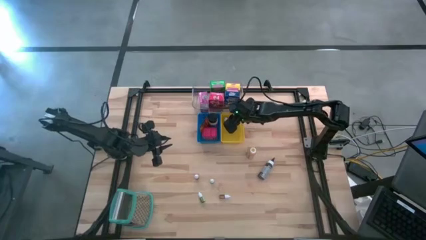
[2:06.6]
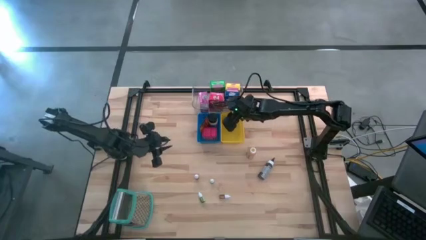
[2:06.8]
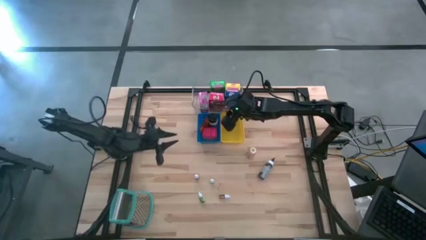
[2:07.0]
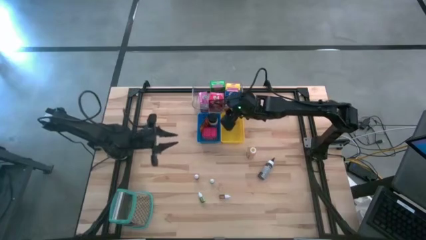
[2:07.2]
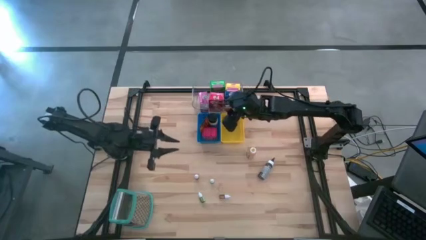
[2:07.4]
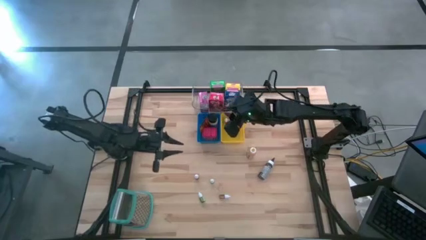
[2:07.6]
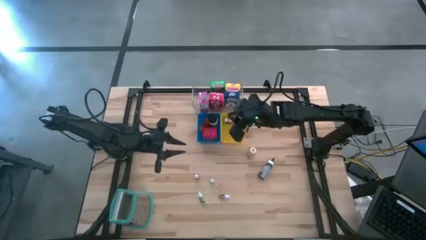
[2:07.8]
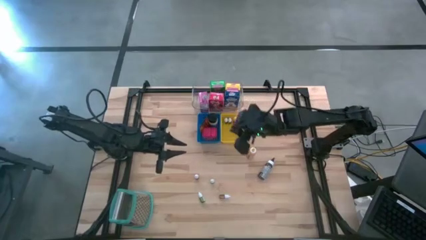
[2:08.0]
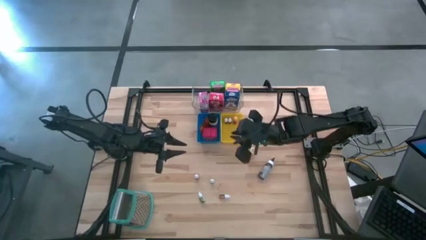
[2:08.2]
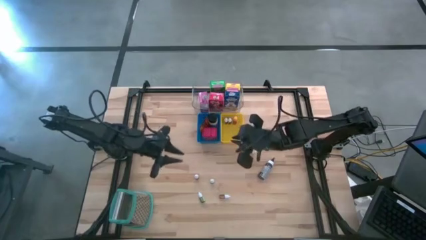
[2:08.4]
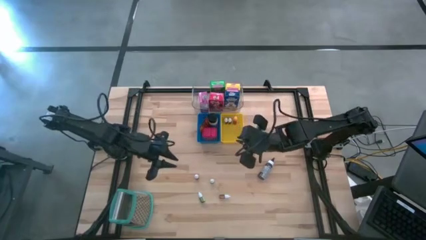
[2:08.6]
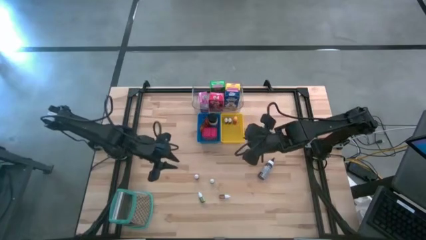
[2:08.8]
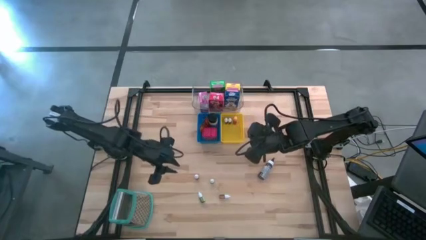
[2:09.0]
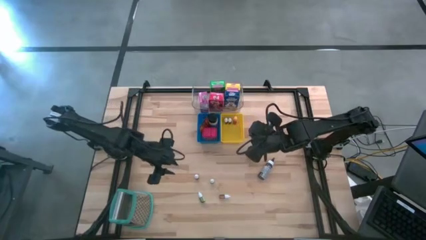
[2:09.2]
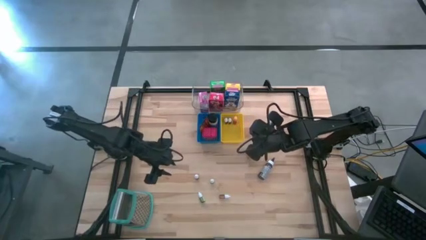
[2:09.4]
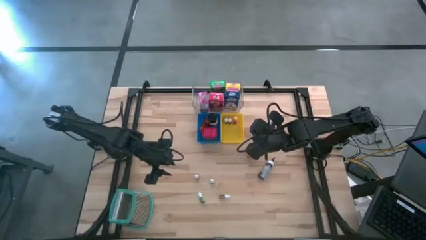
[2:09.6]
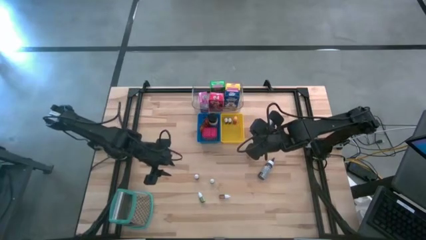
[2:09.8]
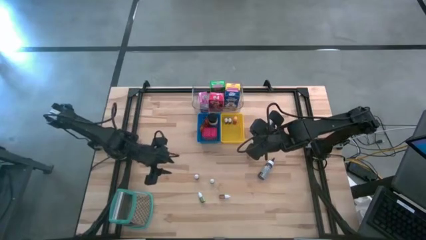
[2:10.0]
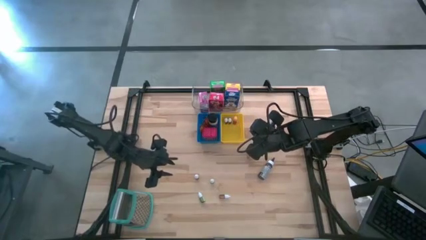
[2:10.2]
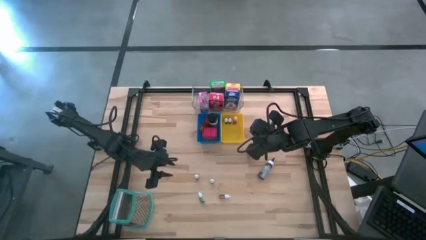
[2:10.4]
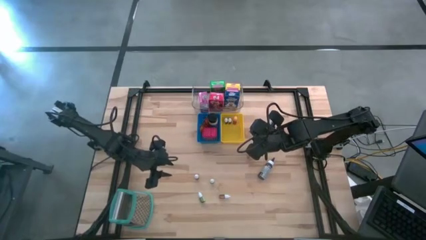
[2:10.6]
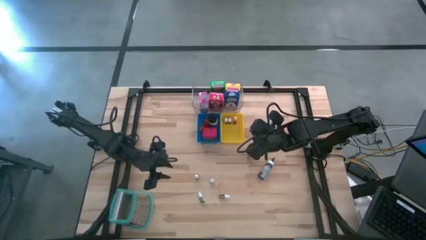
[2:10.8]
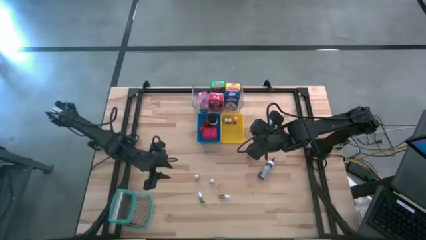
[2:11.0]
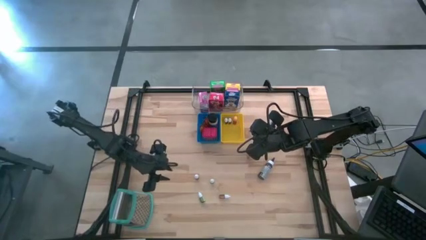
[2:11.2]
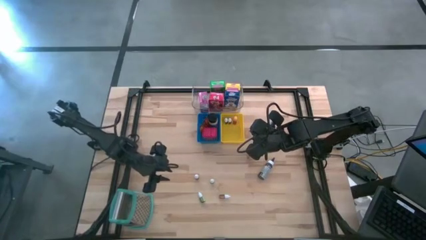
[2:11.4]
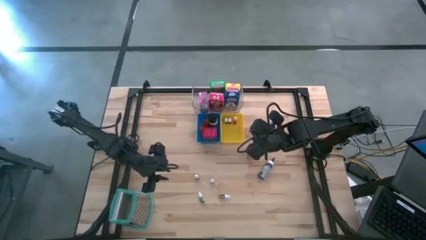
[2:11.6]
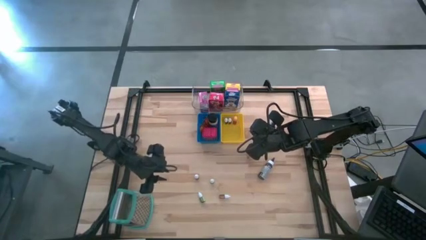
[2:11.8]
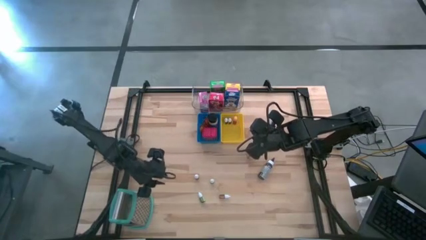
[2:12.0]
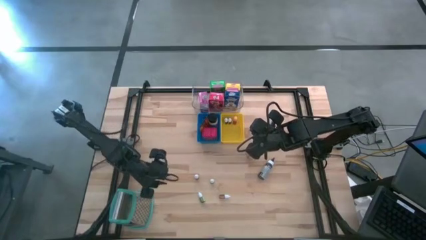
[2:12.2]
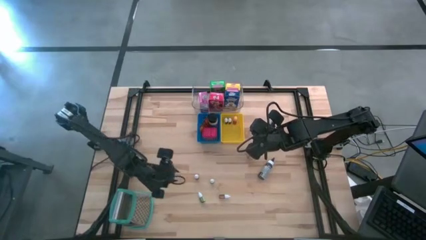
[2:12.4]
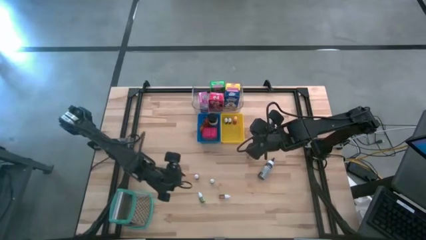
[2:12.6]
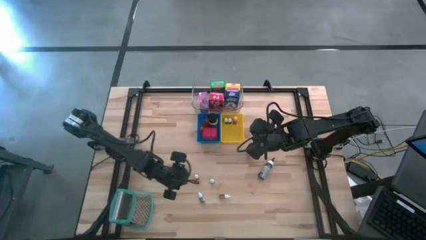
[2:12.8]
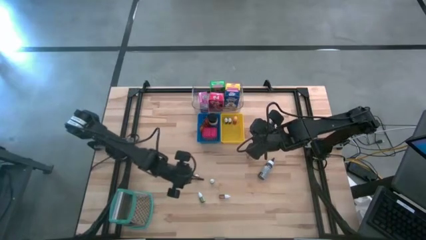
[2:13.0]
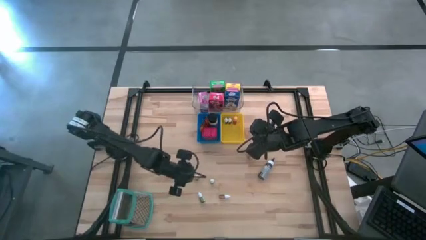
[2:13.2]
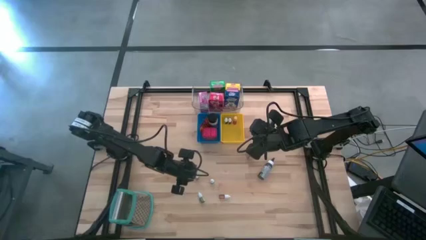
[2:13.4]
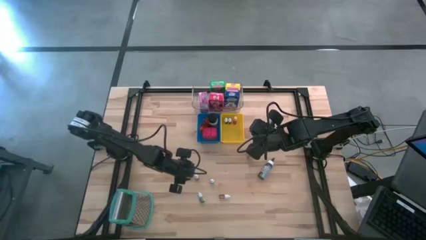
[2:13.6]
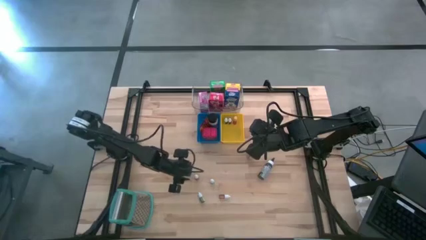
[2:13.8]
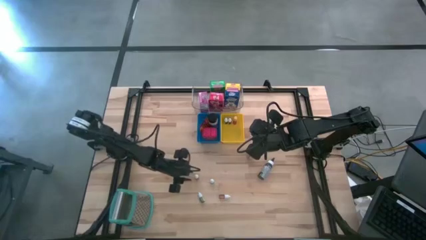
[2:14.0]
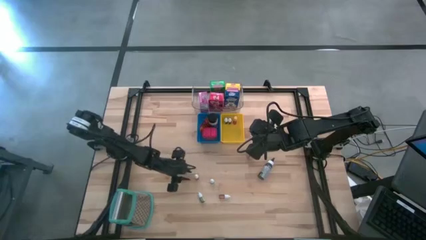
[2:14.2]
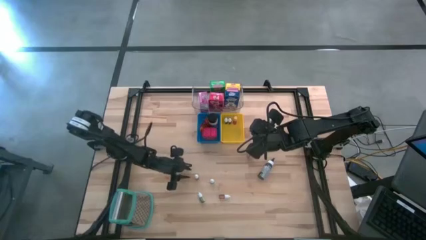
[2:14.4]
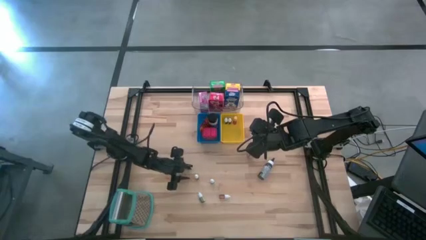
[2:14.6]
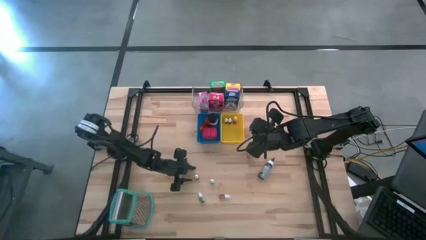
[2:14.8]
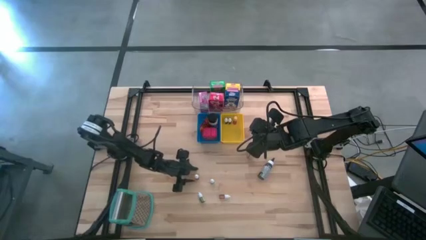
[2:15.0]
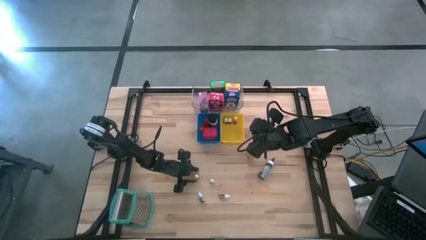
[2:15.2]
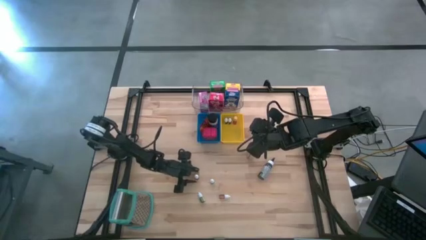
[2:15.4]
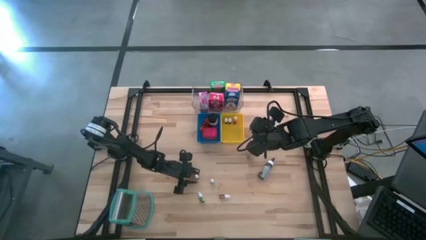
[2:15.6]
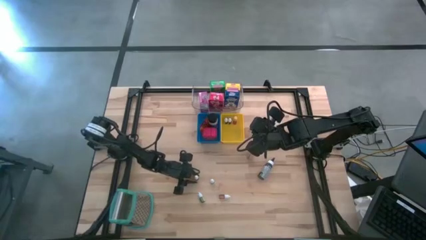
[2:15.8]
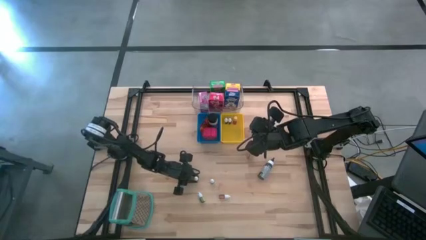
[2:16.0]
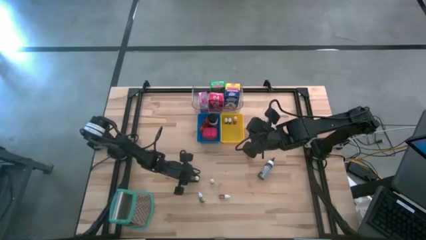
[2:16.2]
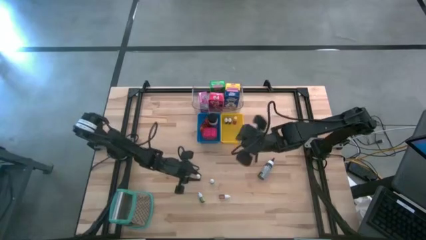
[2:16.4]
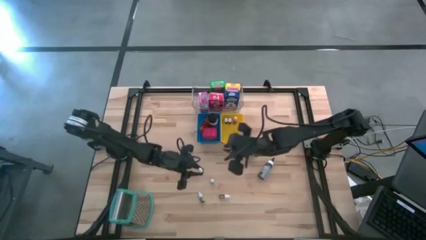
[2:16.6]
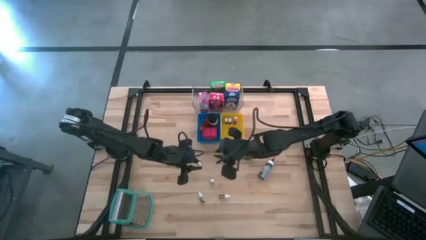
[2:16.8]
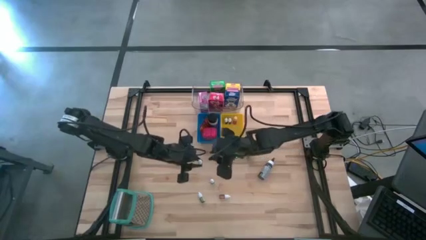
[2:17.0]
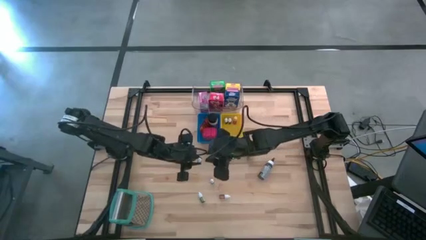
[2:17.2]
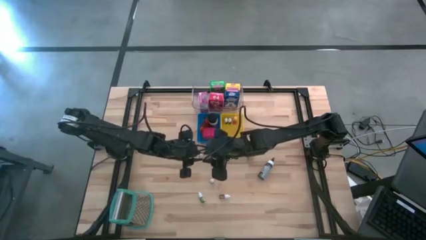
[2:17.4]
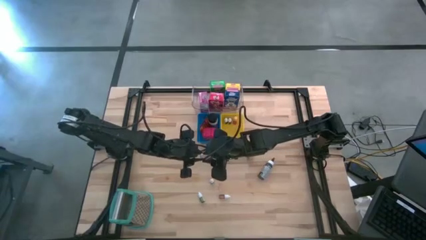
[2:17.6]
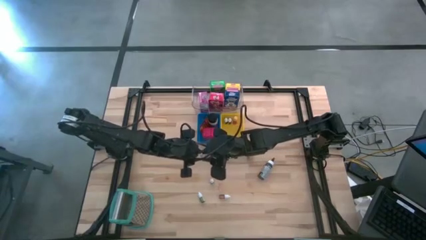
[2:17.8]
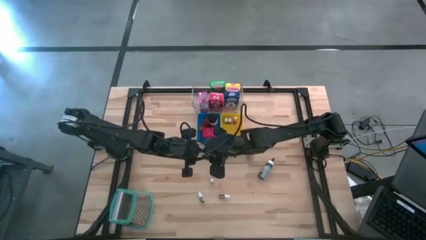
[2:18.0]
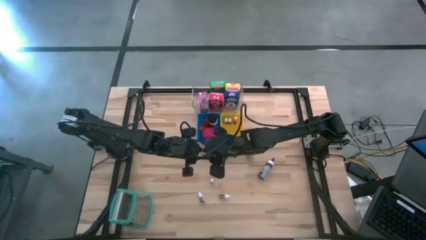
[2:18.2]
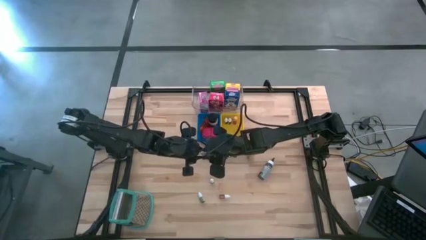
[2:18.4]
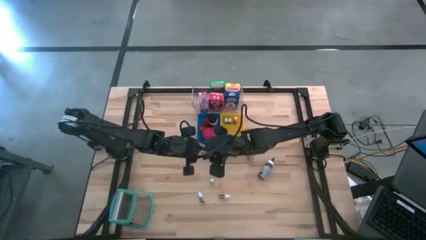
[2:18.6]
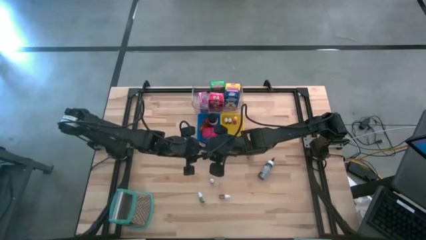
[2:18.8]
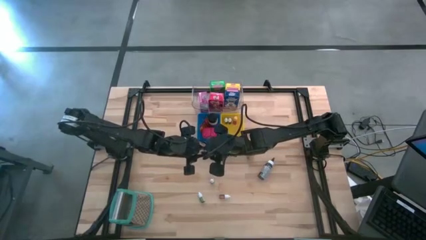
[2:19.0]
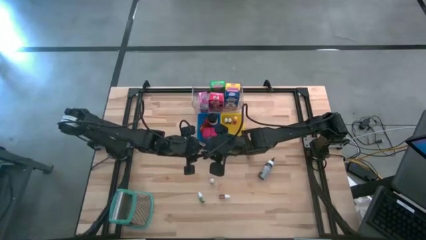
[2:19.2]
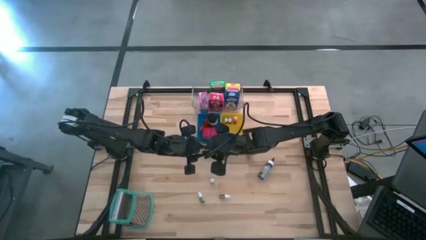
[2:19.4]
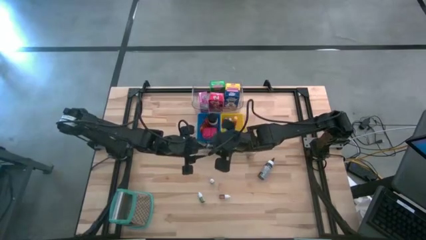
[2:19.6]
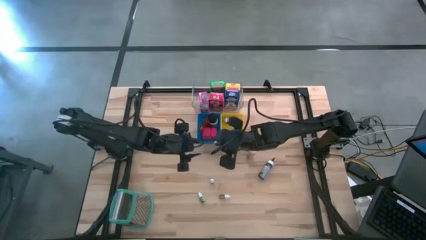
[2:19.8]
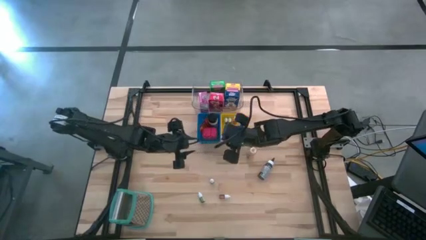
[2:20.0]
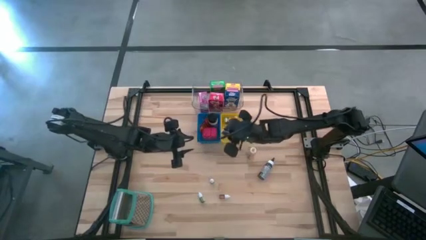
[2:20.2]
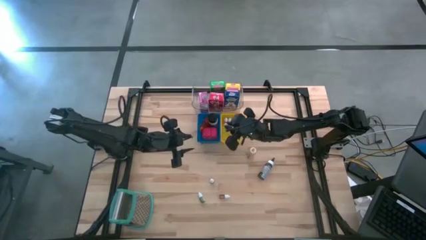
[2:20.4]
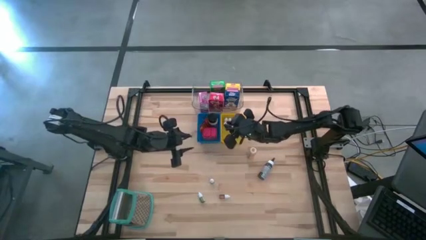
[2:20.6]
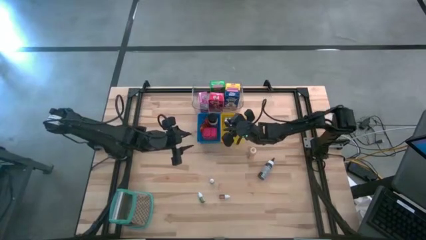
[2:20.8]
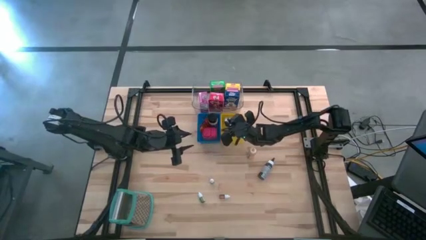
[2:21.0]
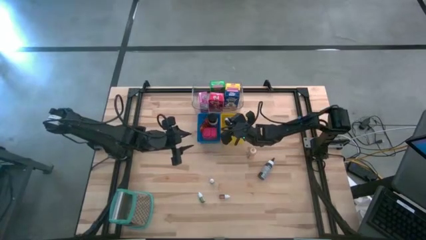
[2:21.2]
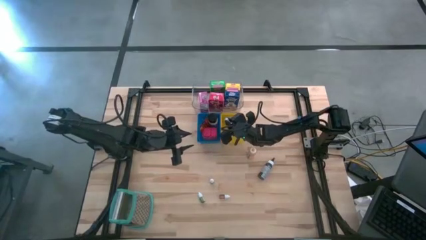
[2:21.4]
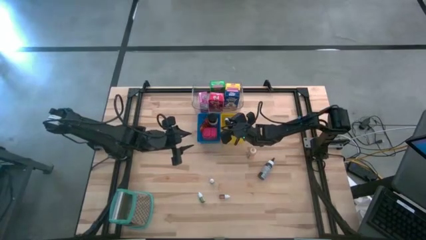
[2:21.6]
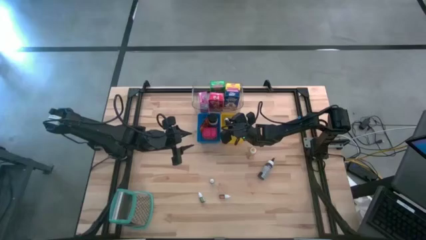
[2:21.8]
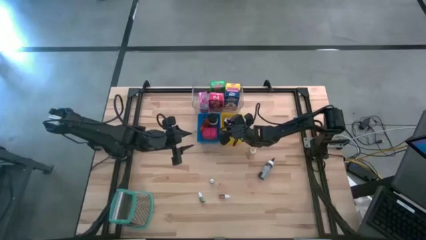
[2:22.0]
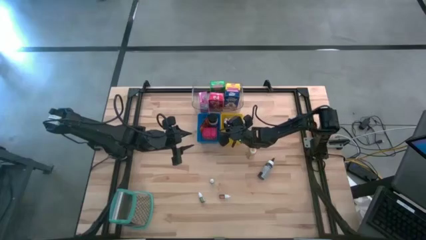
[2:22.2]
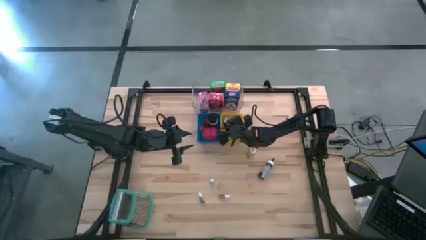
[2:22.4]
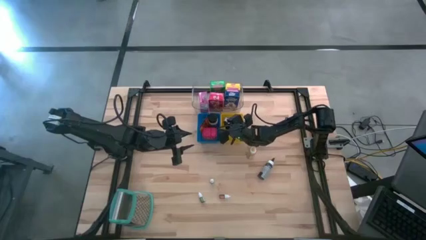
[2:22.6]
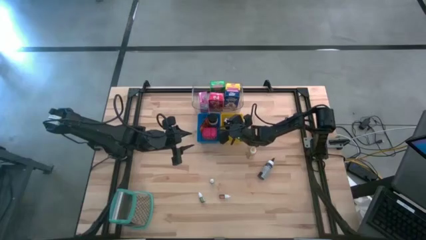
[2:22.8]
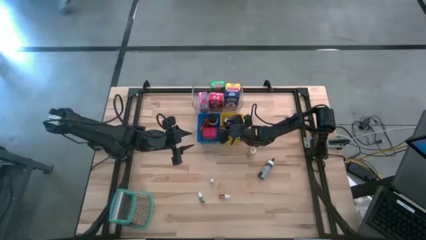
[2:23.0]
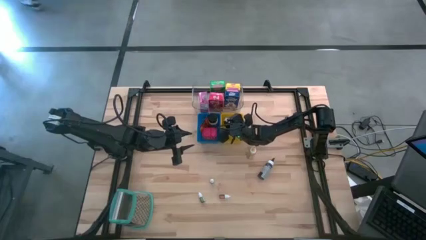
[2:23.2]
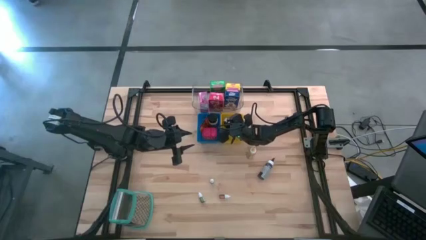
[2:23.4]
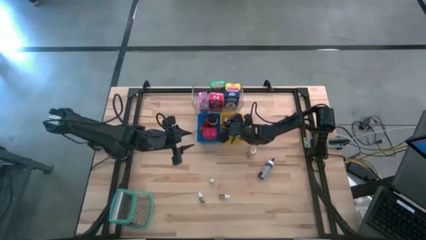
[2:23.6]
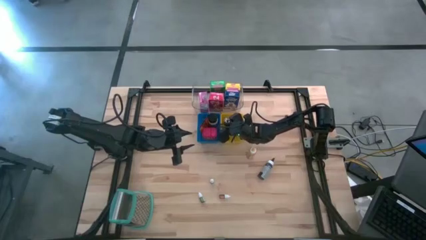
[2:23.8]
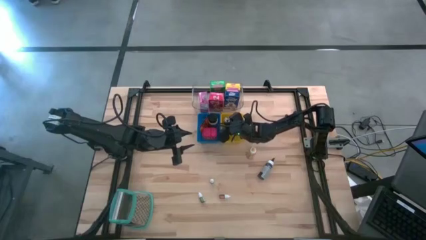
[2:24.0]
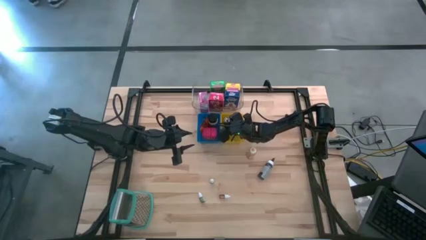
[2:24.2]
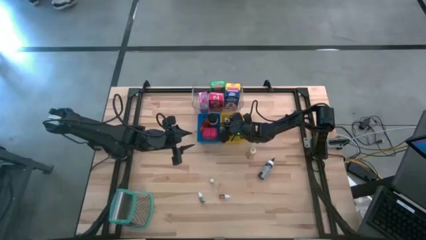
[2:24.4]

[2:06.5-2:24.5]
Task: Pick & Place Kitchen Items
Put the small red food coloring bottle into the yellow bin
